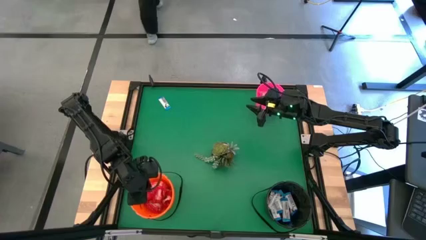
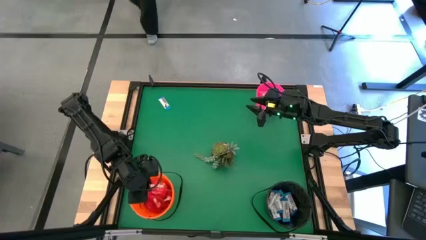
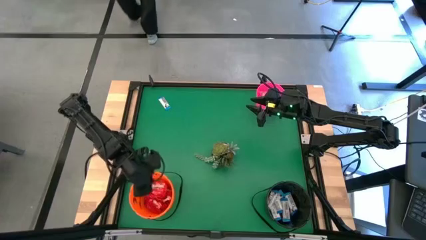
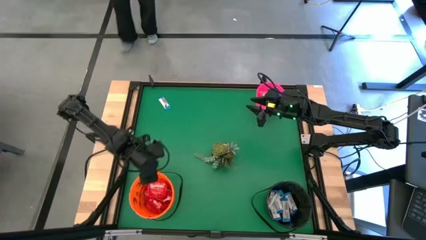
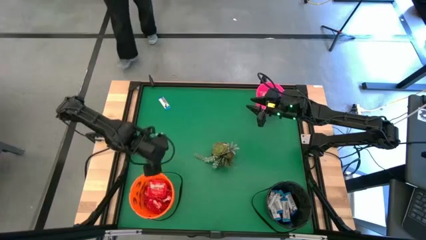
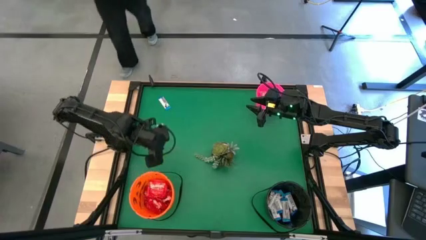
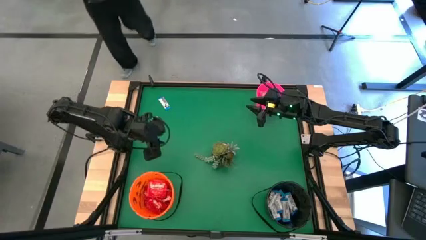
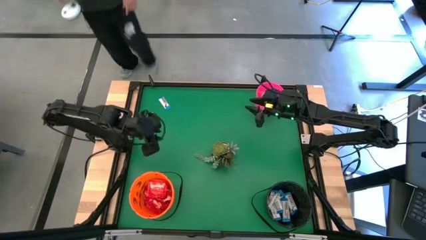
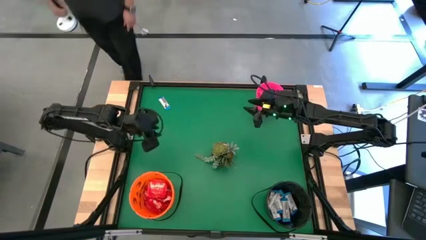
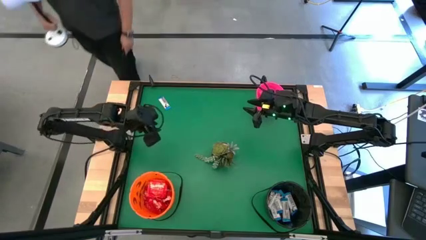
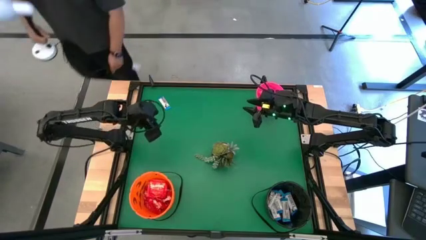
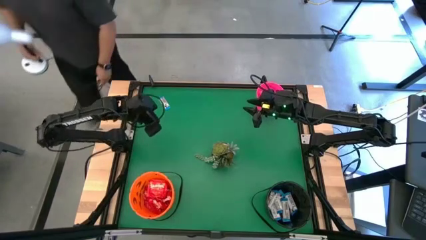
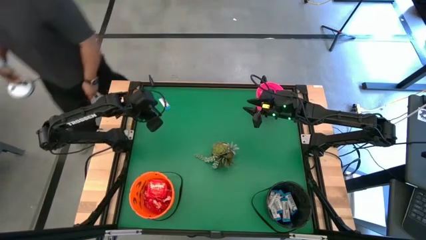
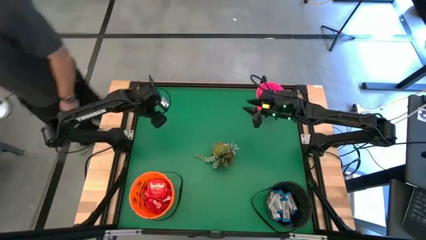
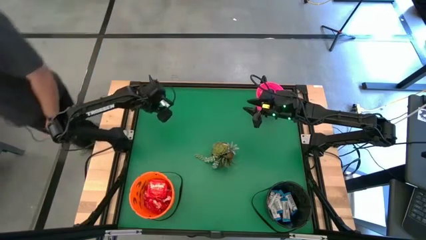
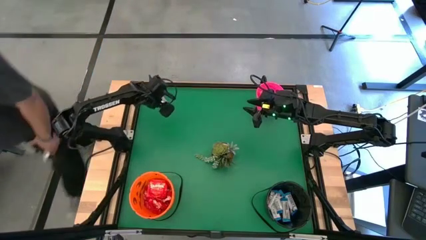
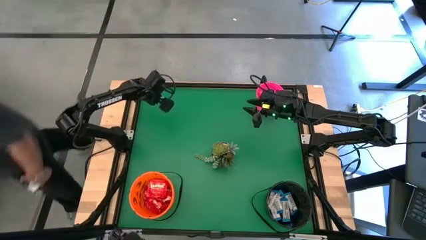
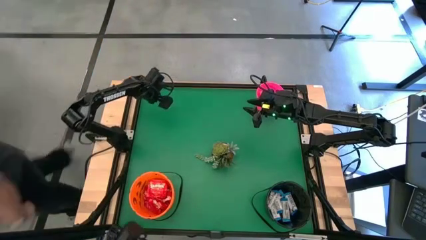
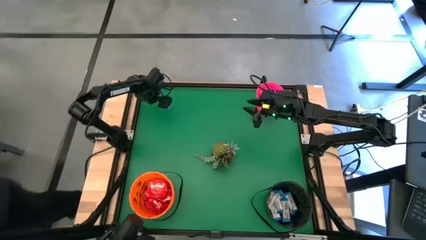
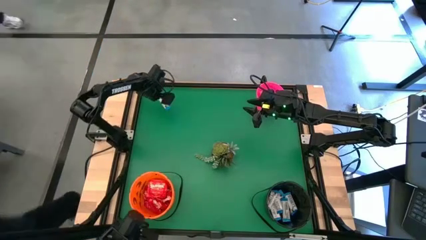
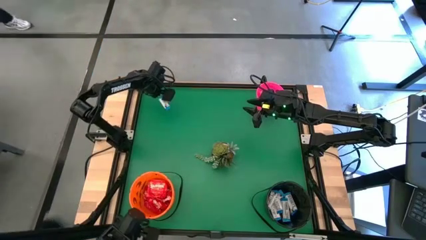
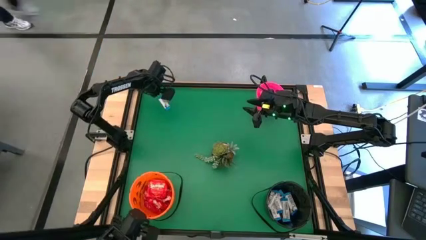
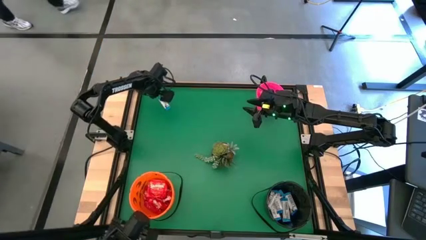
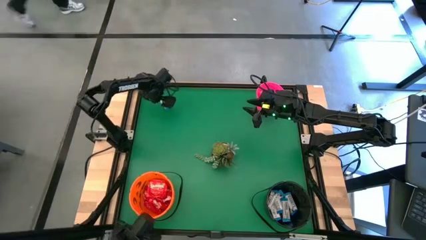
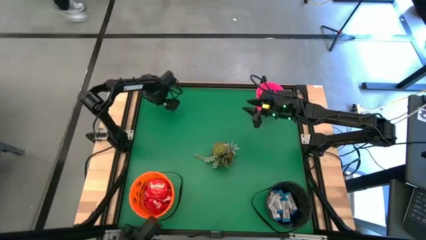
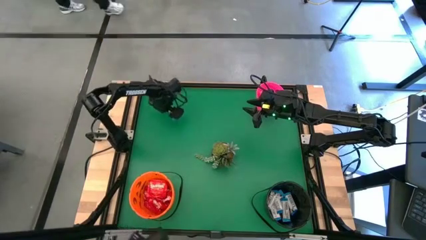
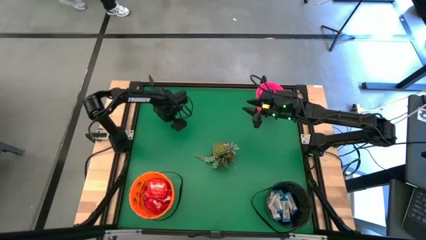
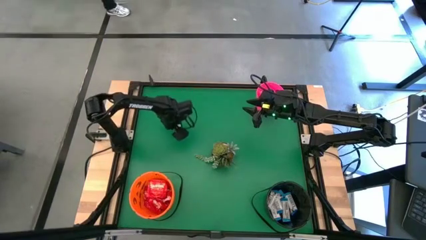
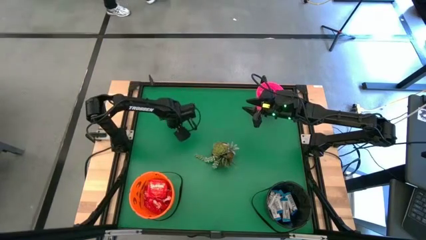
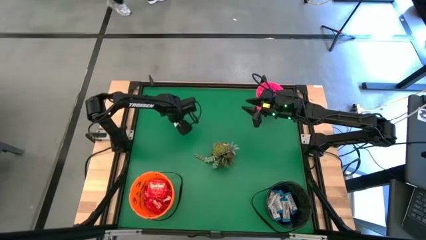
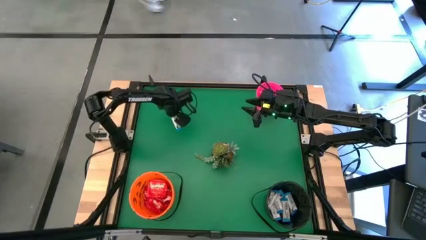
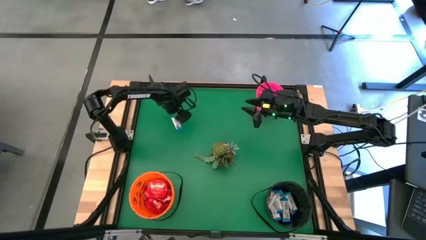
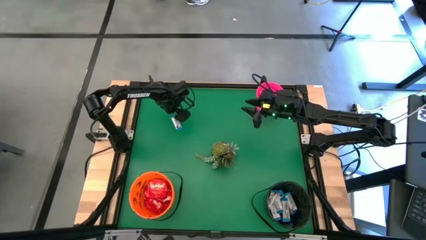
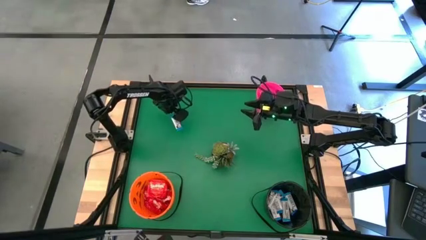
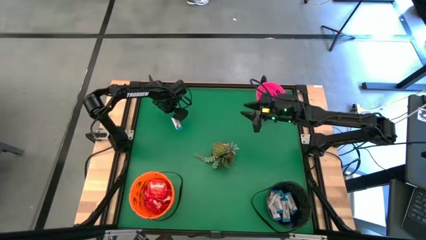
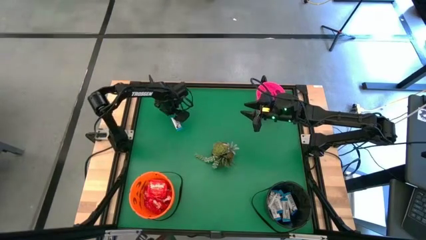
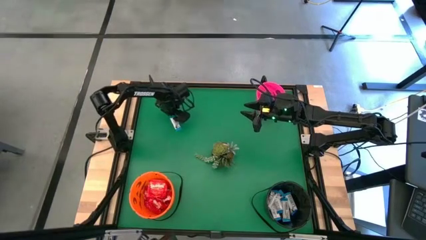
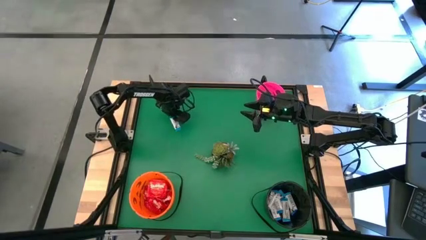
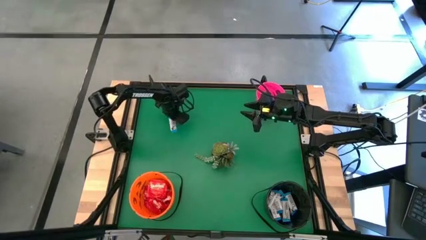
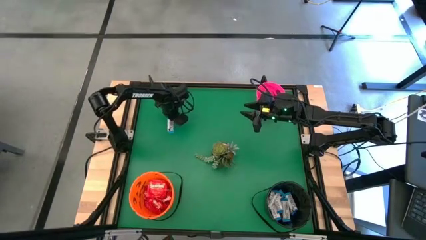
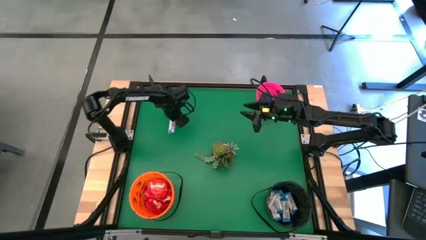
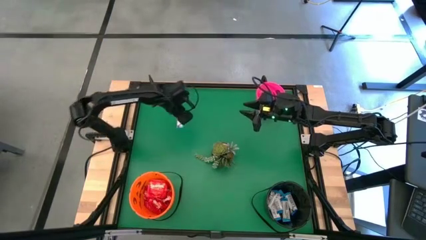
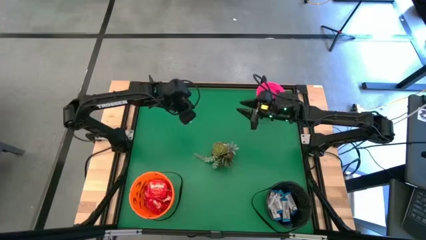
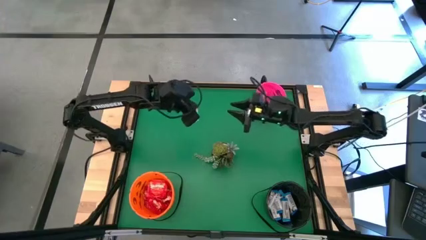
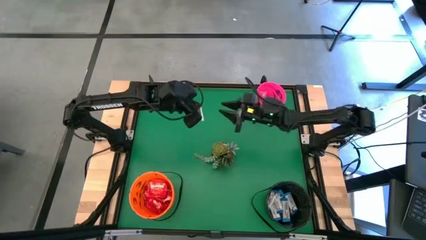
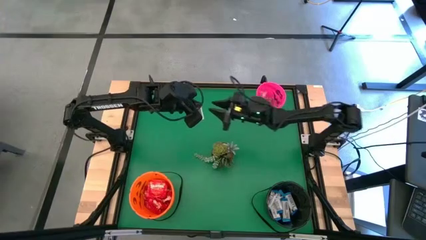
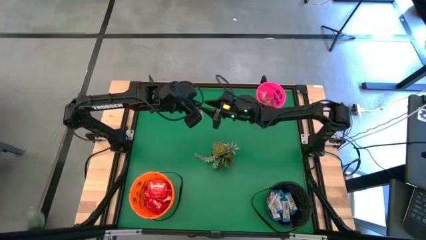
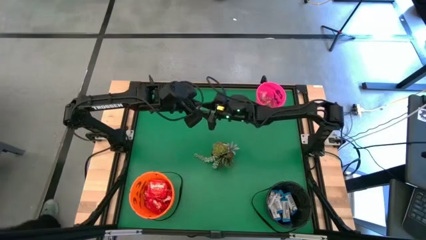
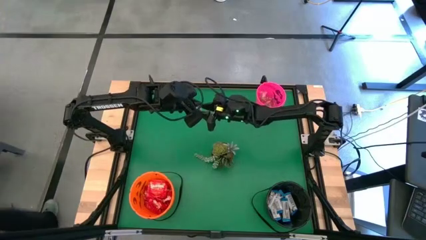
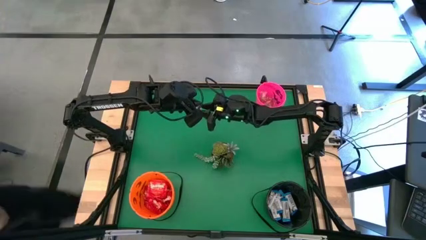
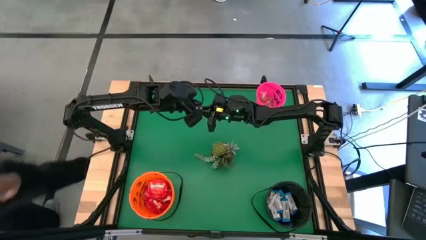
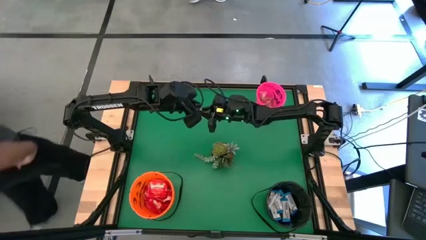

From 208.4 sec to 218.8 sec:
Task: Sort candy
Put the white chocolate into the black bucket

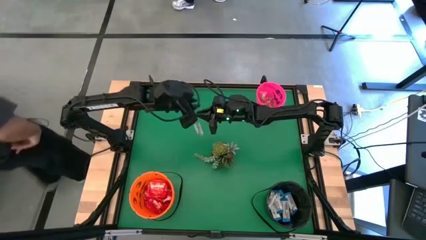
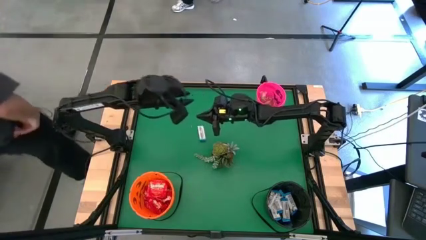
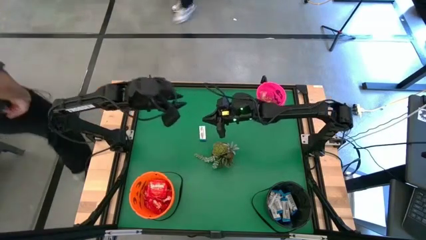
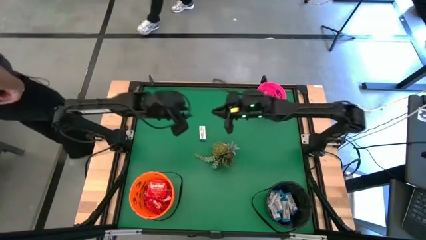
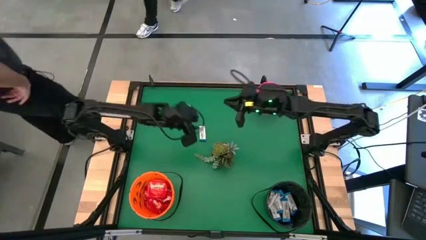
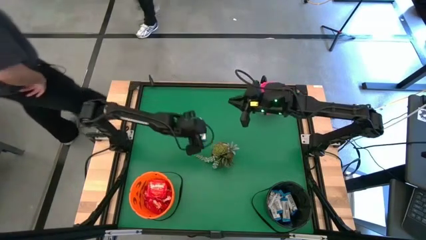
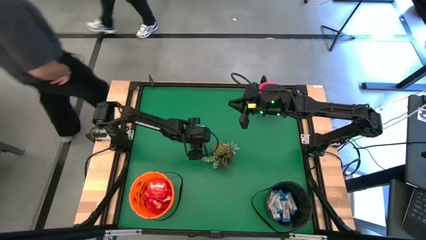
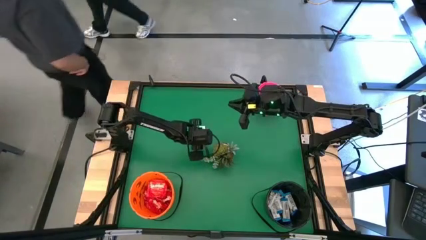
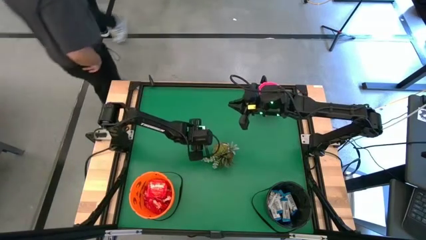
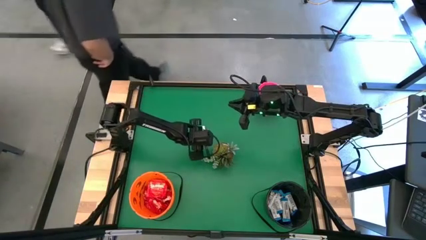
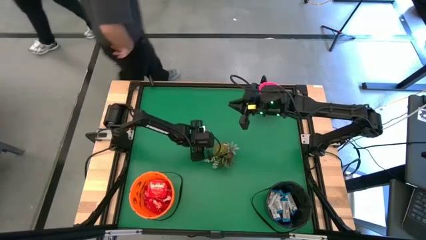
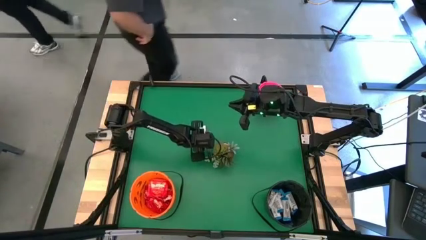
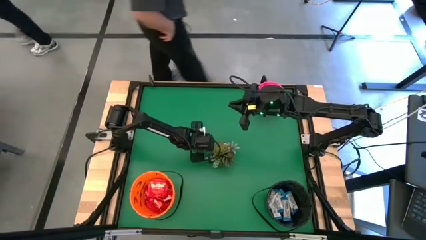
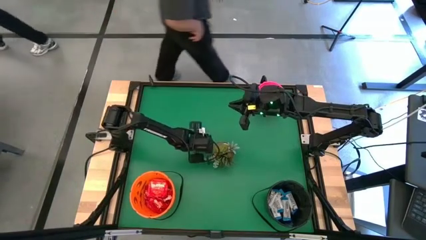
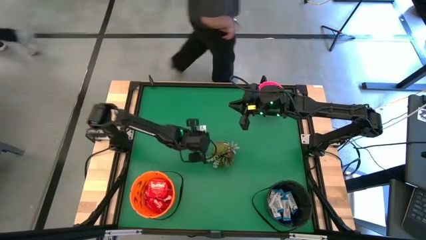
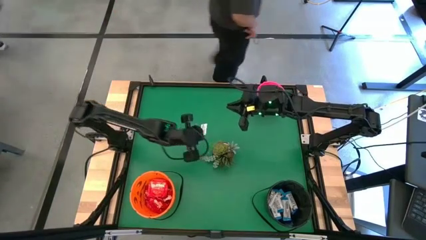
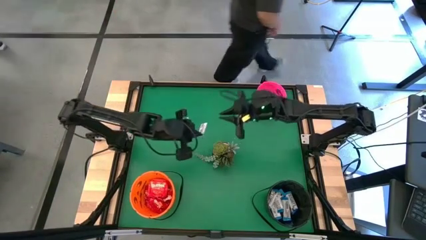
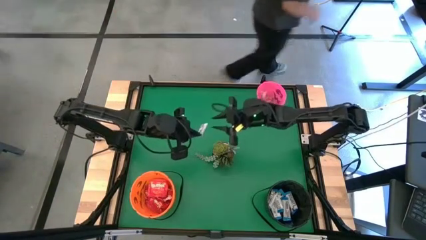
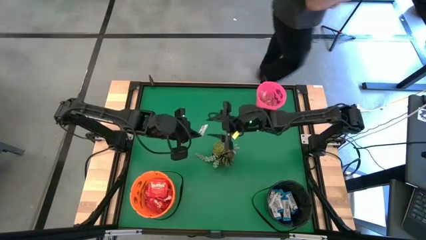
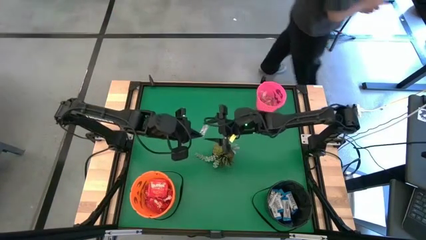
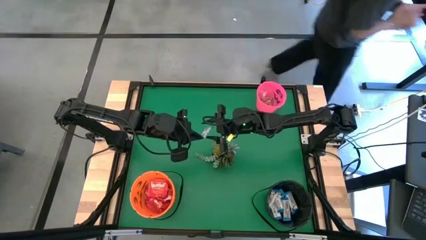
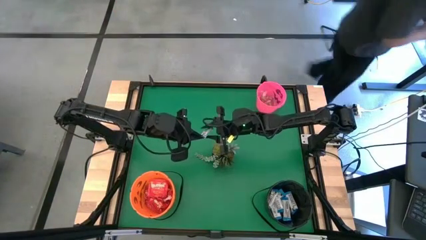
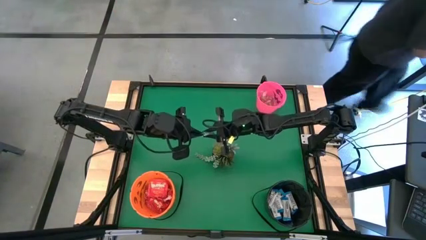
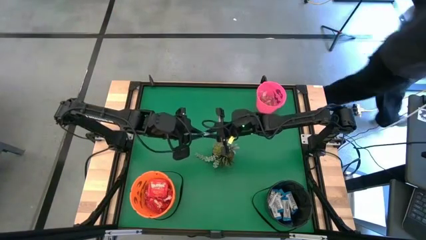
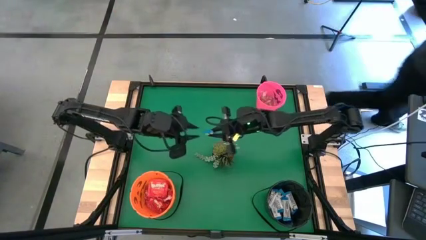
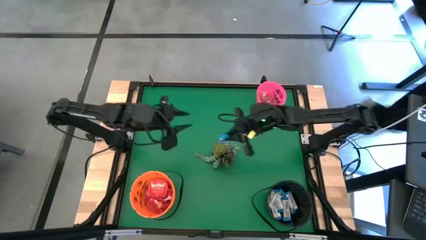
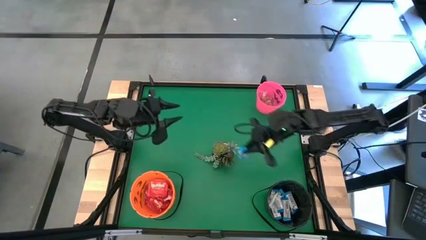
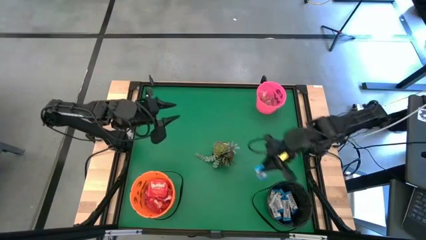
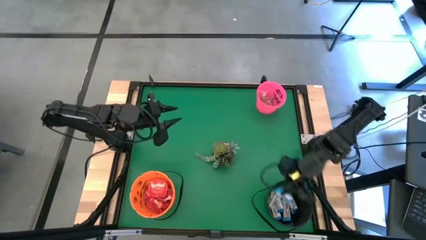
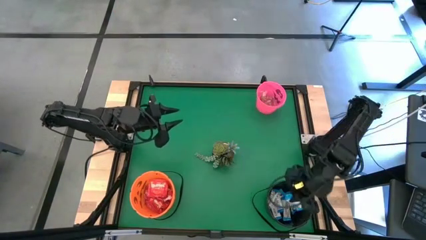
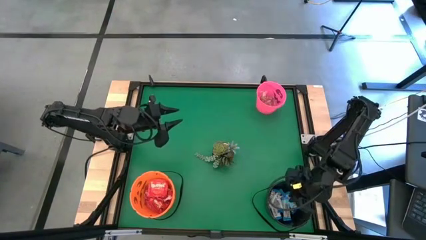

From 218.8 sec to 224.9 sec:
Put the white chocolate into the black bucket
